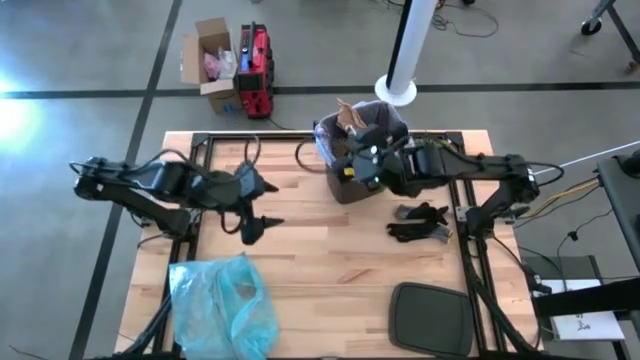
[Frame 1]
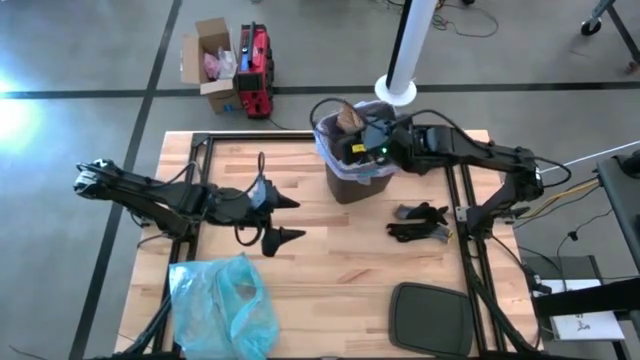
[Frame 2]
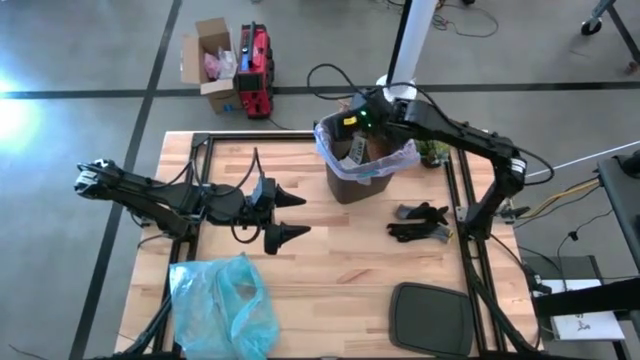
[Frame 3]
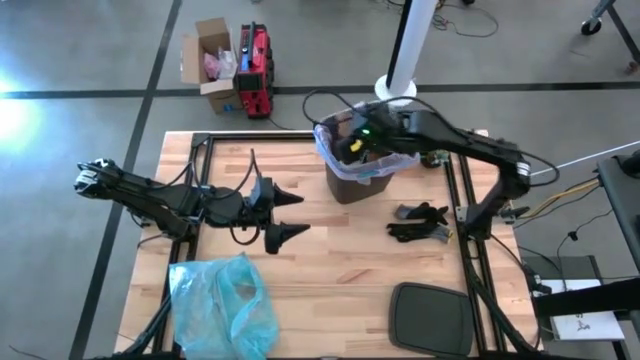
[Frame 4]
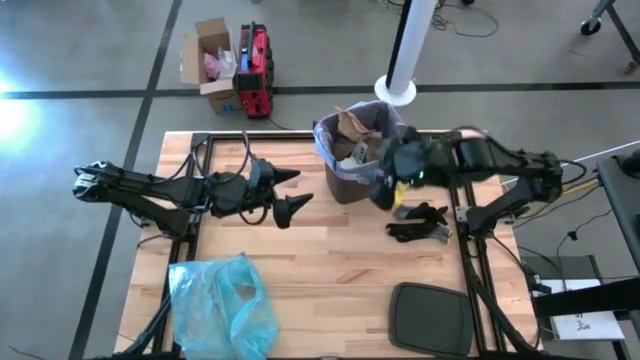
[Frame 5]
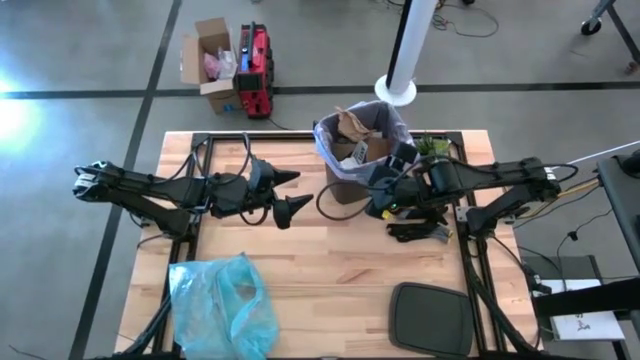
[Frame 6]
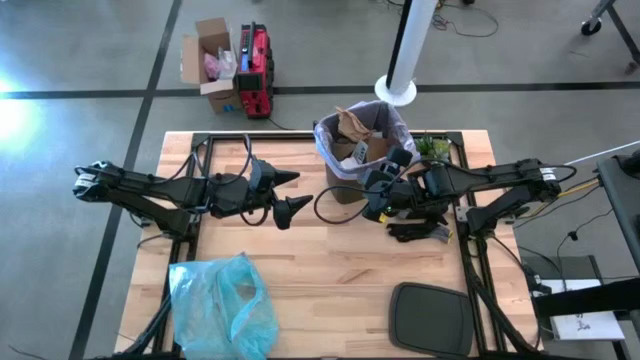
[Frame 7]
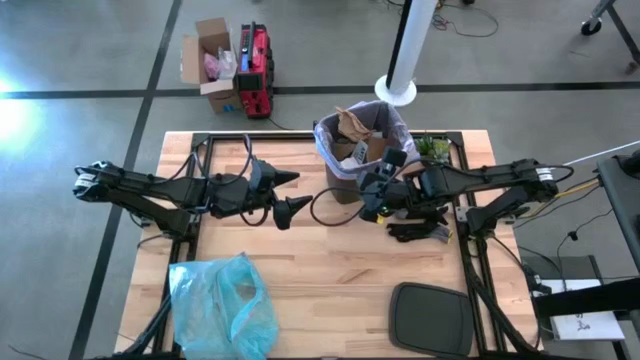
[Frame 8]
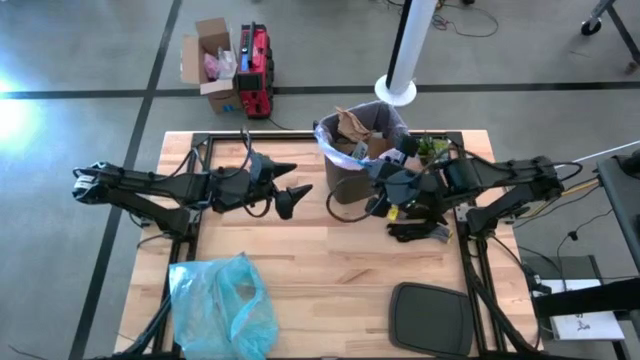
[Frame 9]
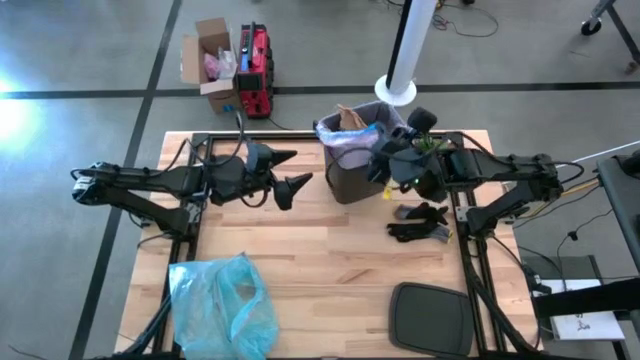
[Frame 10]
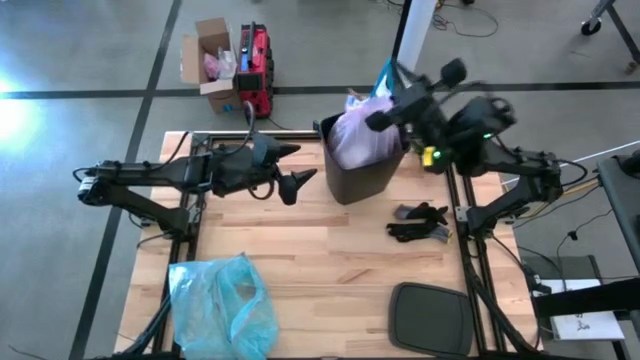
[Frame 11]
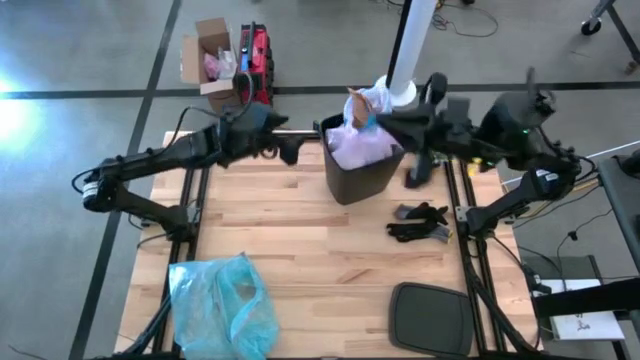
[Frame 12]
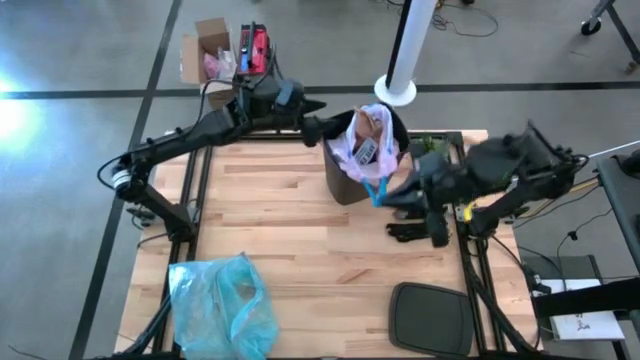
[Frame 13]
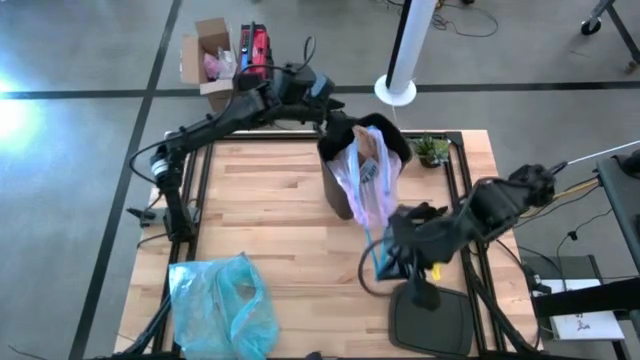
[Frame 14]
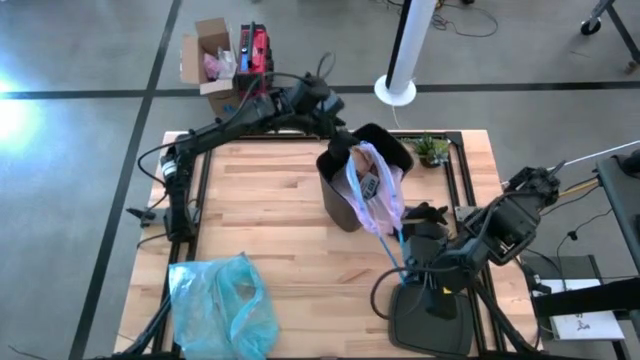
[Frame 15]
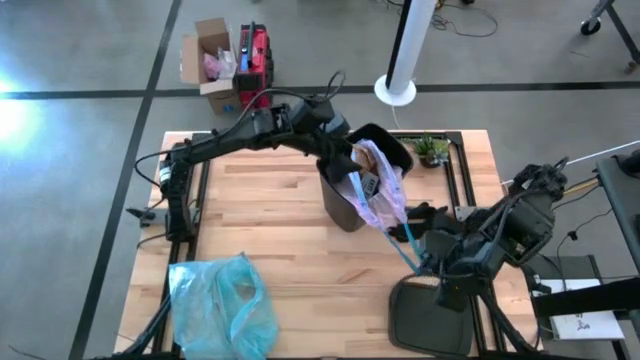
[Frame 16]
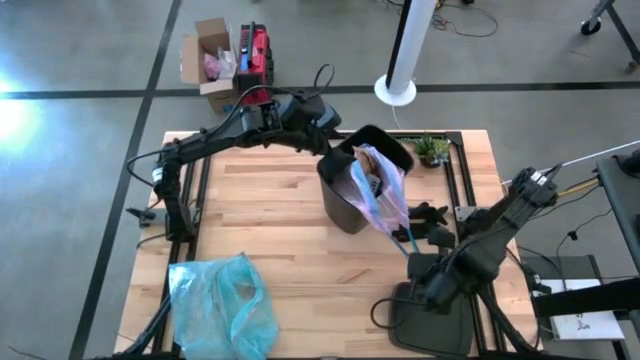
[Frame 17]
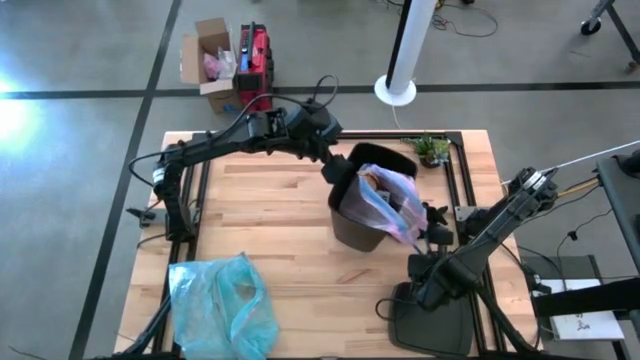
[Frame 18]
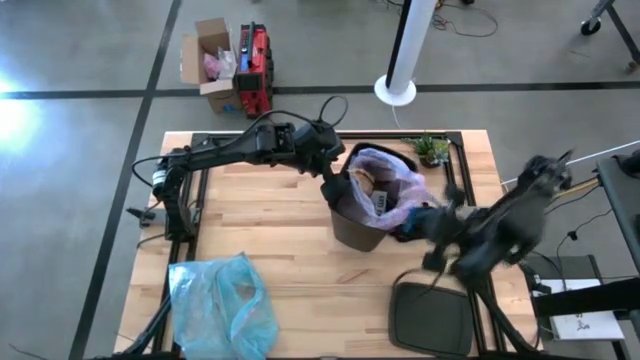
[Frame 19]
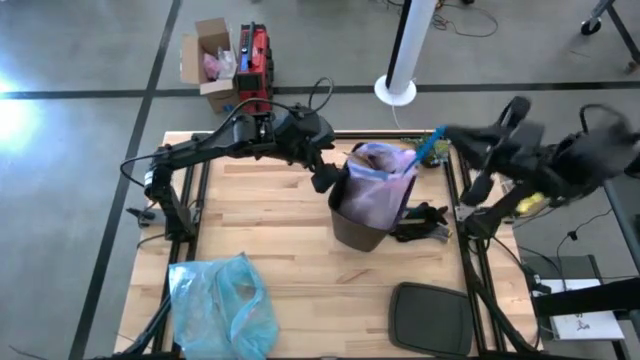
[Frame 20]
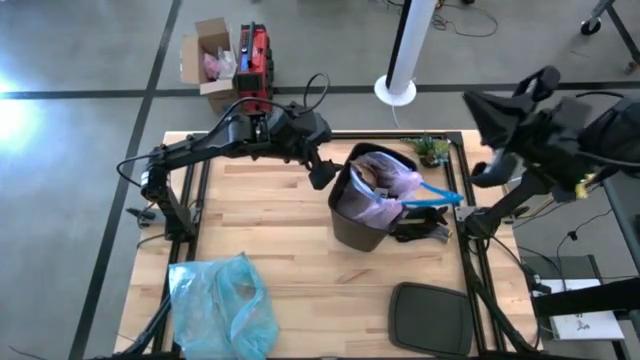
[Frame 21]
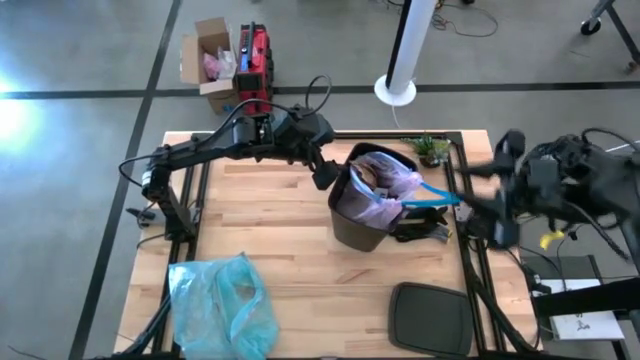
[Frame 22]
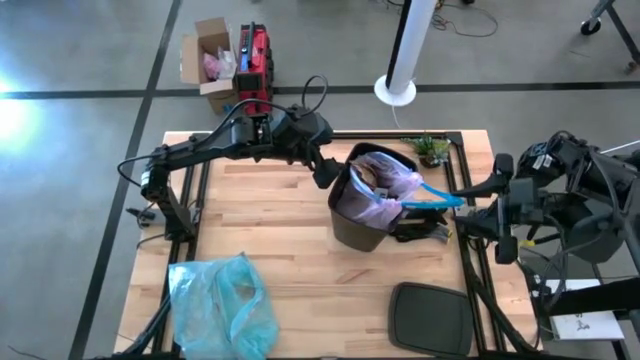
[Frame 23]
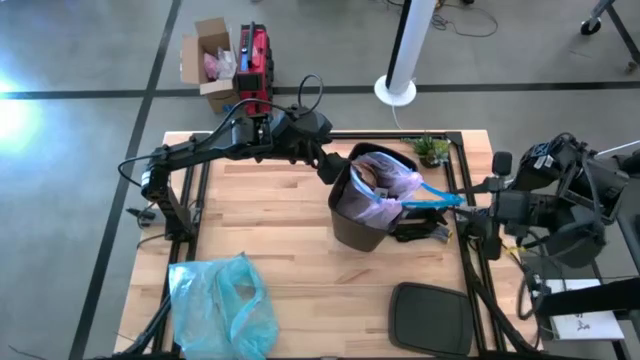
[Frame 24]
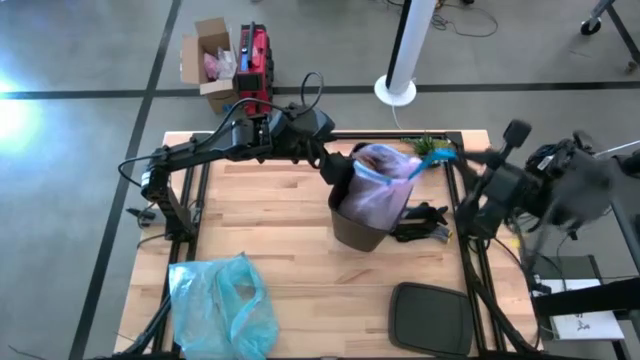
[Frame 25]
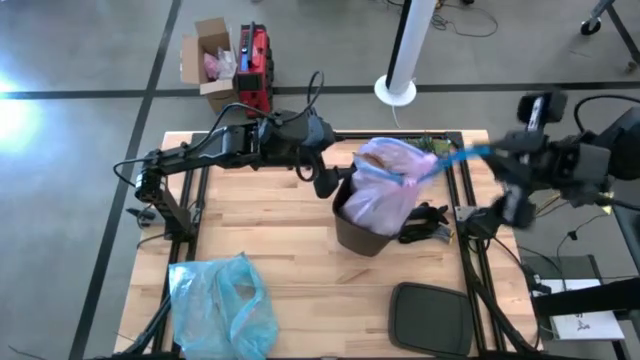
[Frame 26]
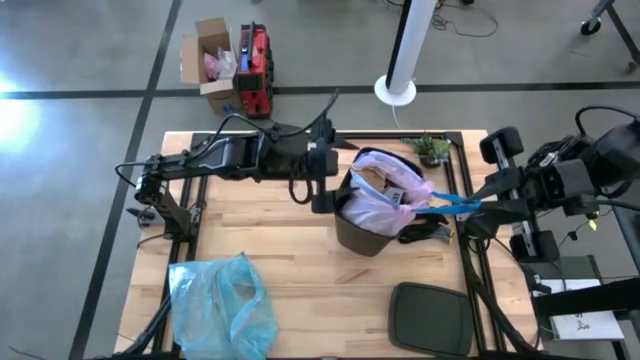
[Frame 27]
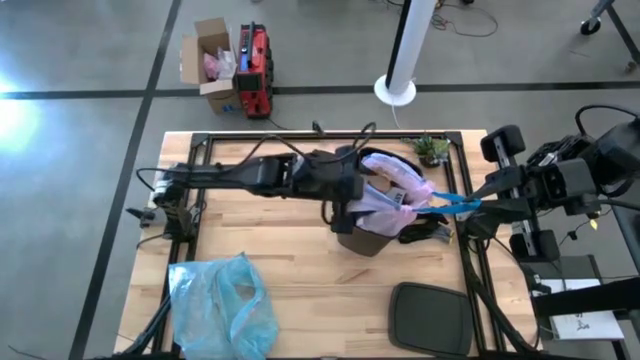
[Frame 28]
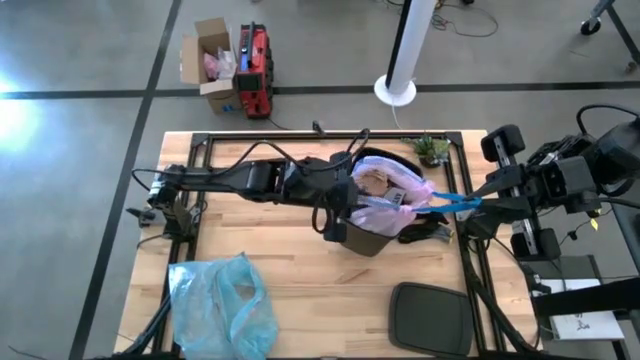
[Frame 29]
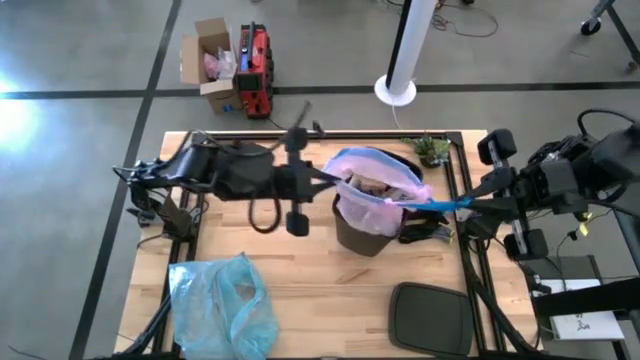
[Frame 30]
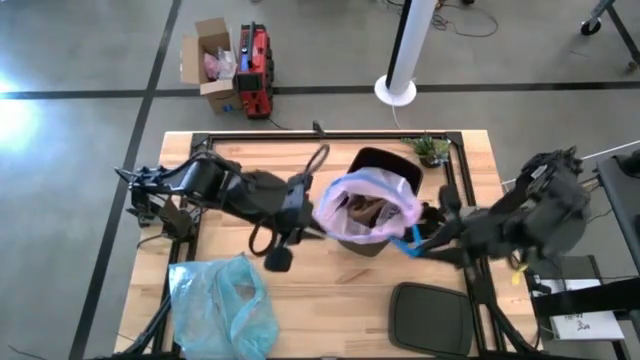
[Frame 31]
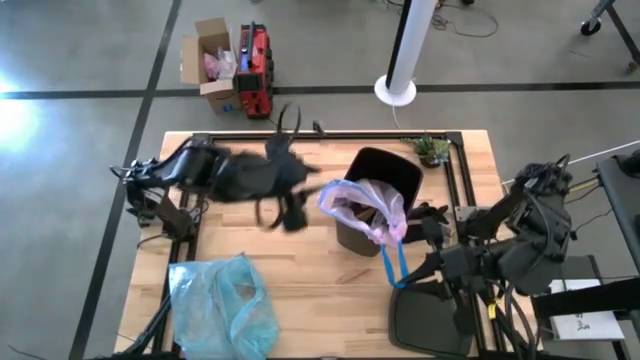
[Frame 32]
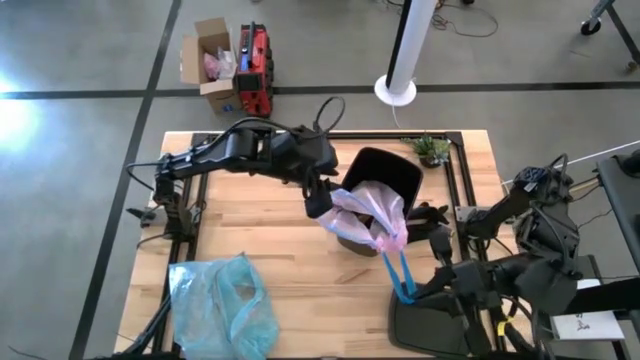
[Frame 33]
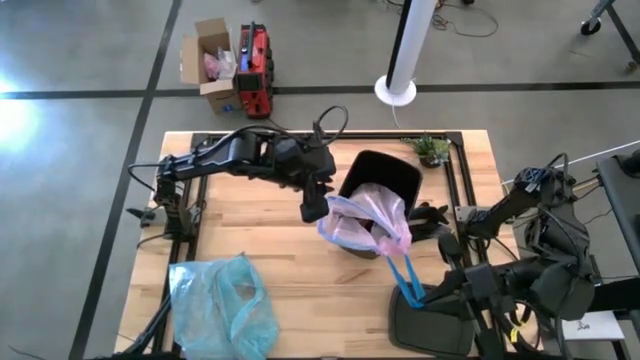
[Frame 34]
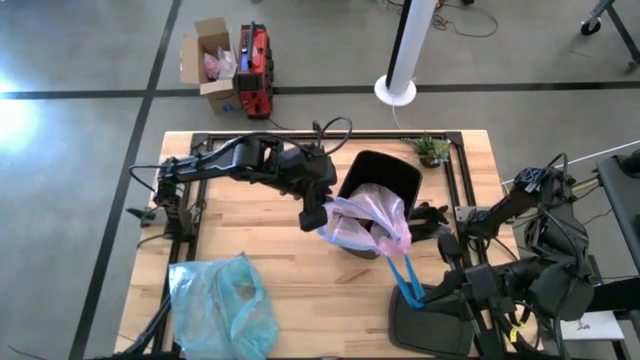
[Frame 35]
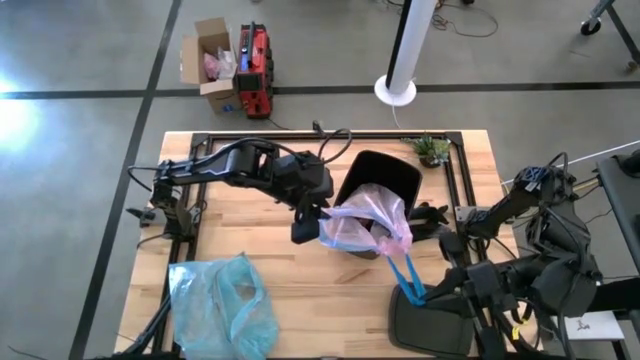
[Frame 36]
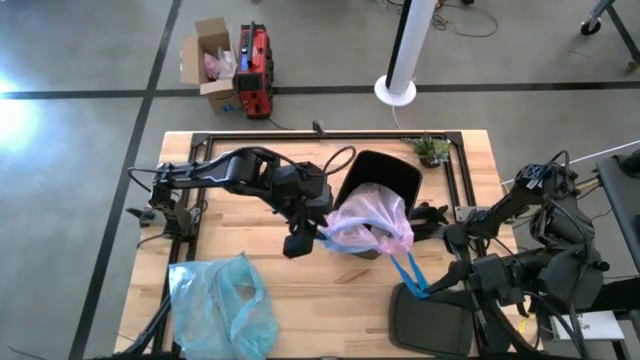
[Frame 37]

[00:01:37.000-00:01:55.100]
Task: place trash/remove bag and relplace
Remove the trash bag from the trash bin

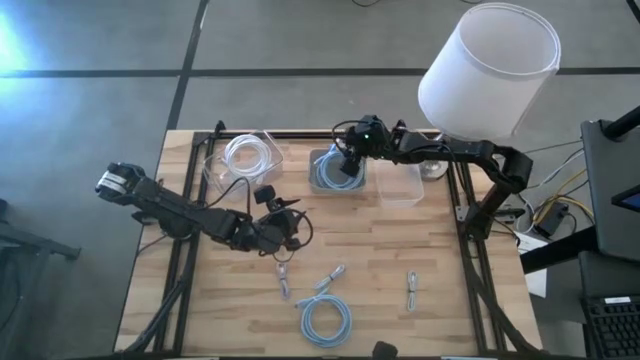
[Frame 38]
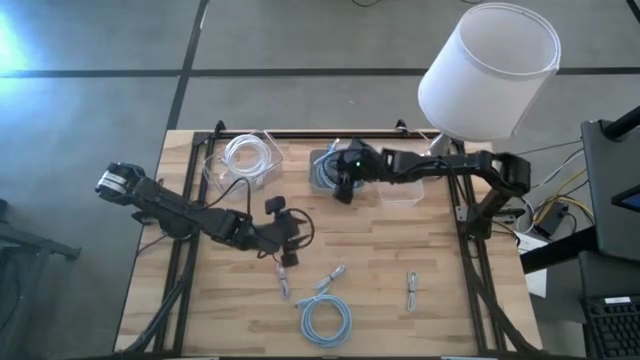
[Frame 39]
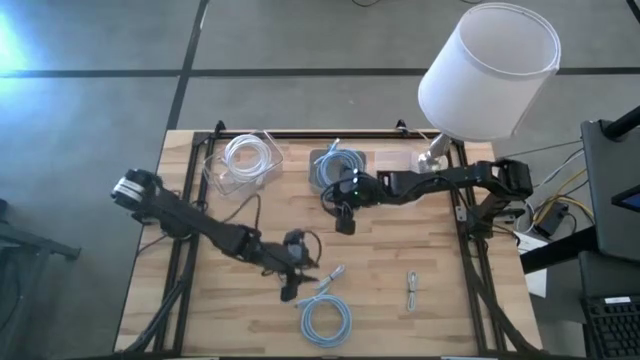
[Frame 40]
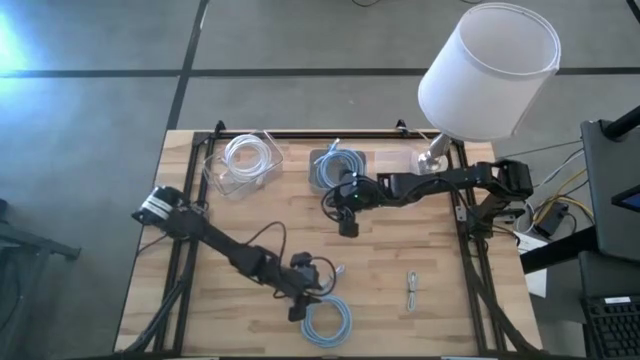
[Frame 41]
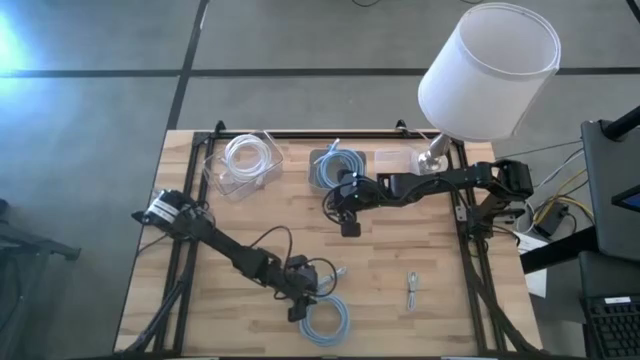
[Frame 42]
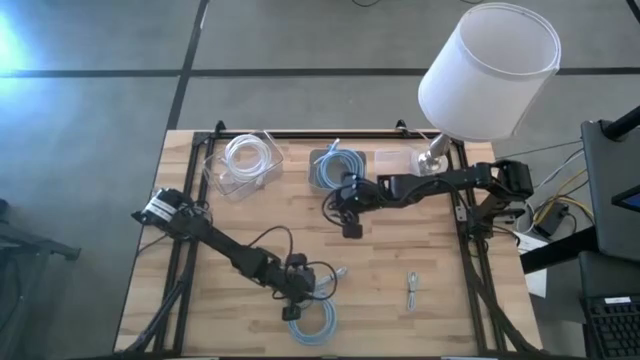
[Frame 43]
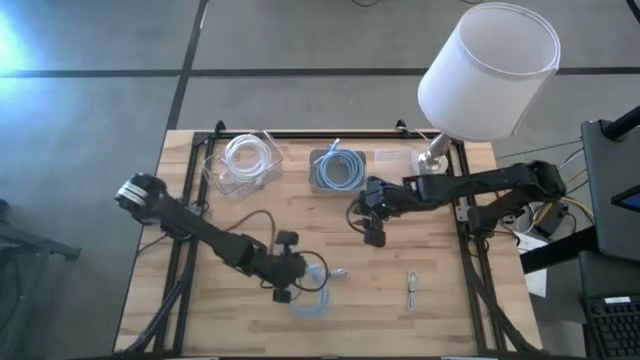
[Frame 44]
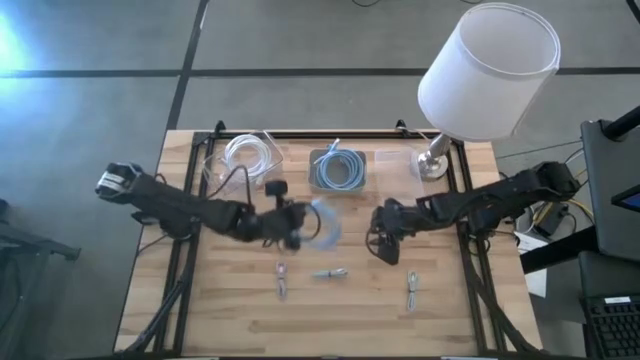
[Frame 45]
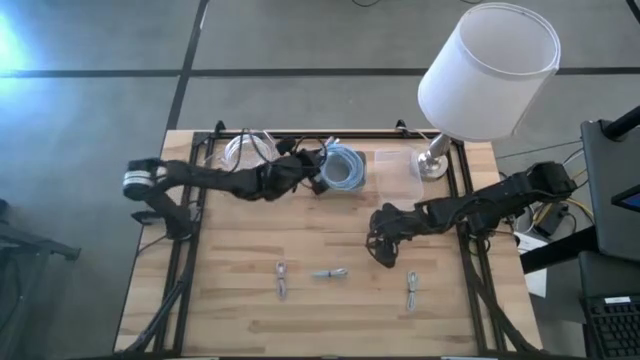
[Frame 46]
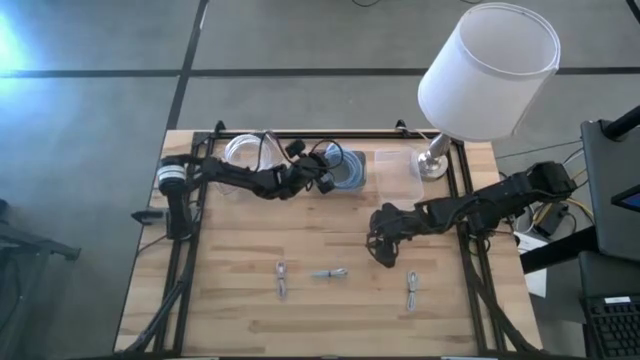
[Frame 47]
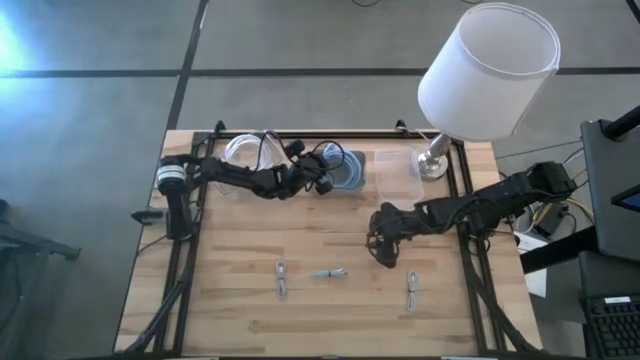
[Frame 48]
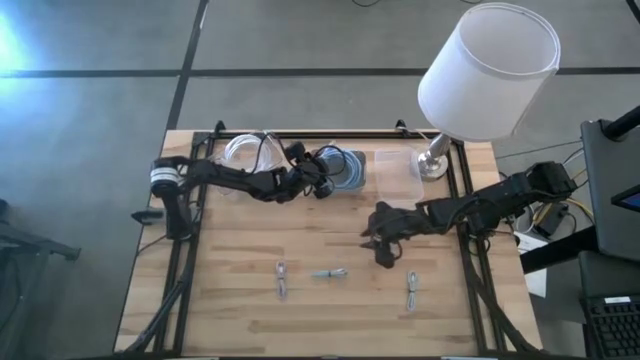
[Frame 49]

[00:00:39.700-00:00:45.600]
Task: Pick & Place USB Port
Put the large blue charger cable into the gray bin
